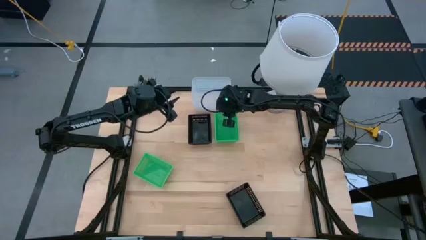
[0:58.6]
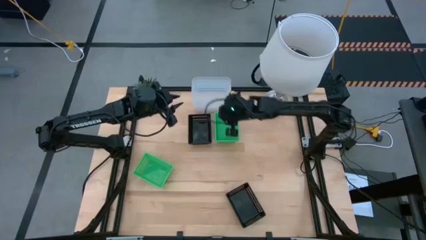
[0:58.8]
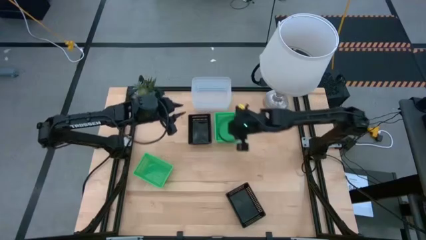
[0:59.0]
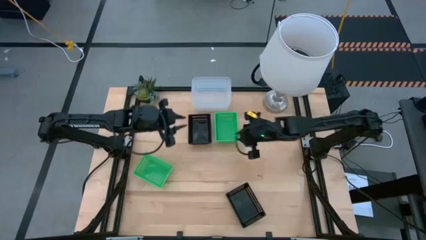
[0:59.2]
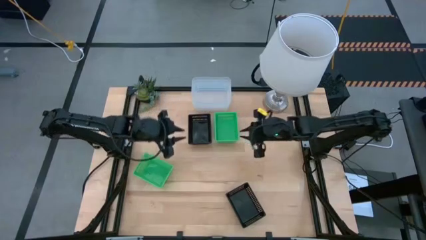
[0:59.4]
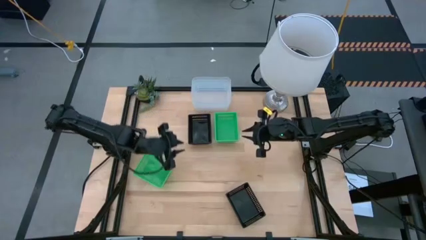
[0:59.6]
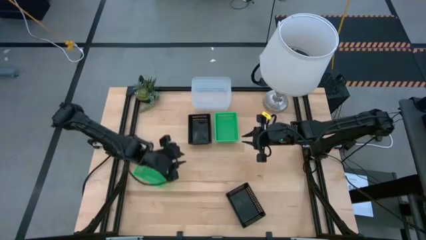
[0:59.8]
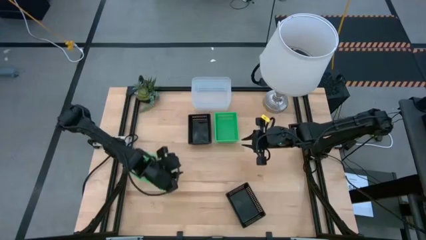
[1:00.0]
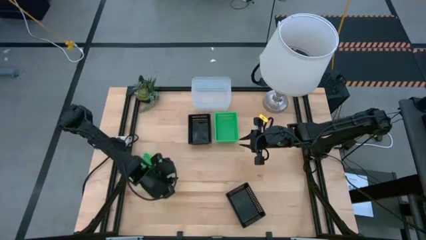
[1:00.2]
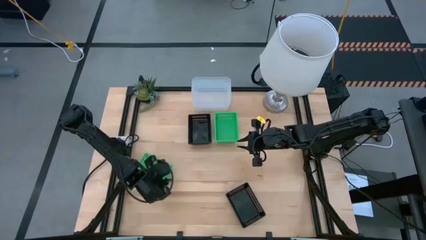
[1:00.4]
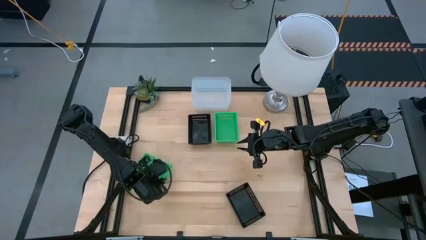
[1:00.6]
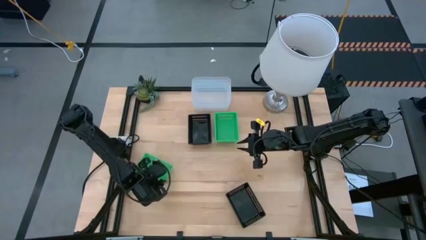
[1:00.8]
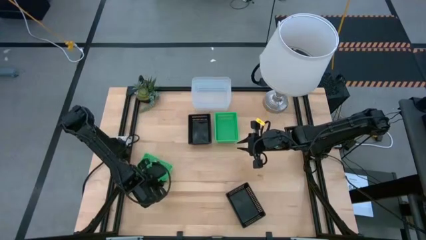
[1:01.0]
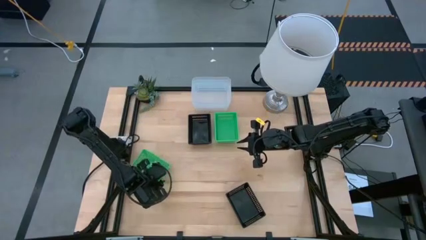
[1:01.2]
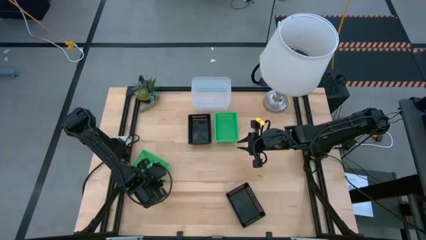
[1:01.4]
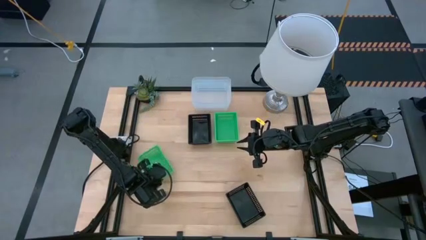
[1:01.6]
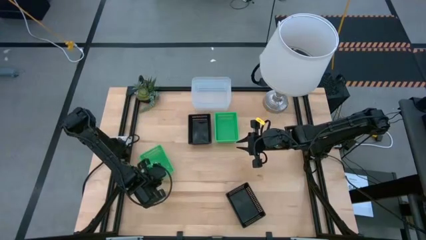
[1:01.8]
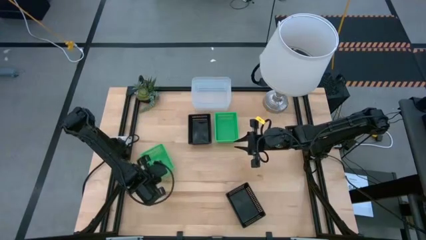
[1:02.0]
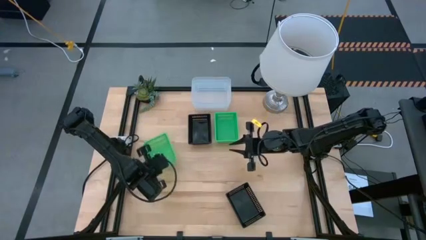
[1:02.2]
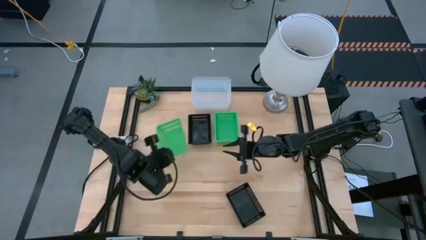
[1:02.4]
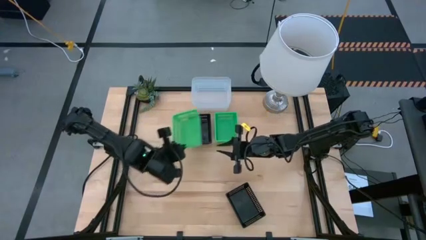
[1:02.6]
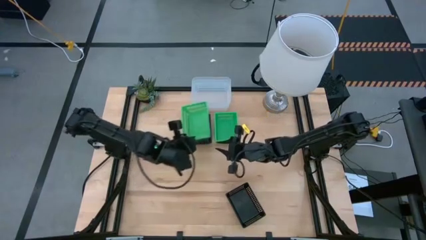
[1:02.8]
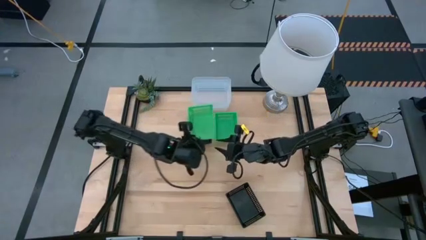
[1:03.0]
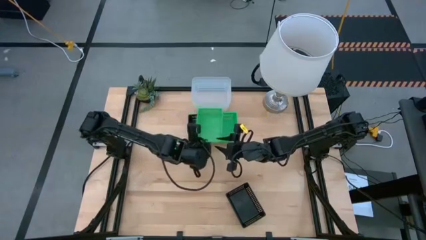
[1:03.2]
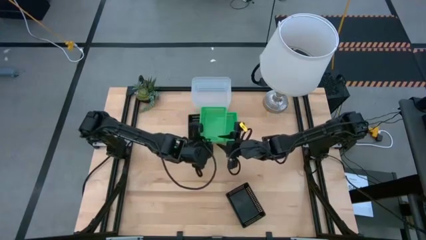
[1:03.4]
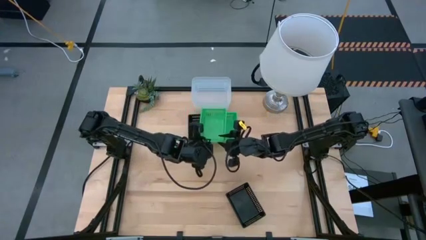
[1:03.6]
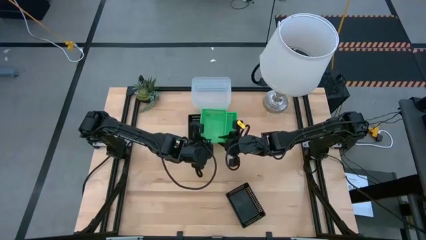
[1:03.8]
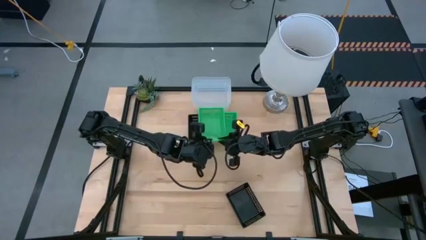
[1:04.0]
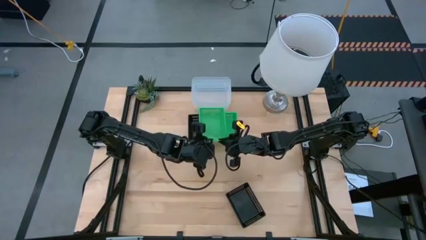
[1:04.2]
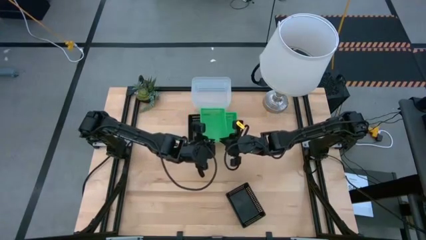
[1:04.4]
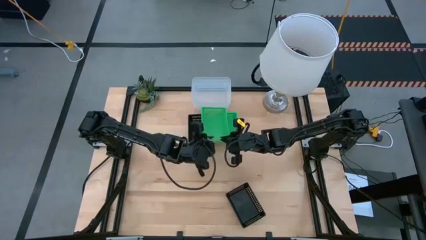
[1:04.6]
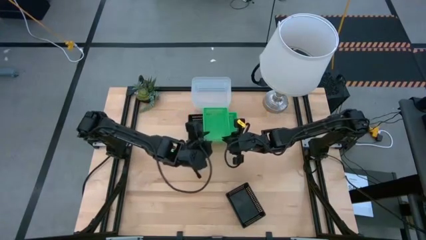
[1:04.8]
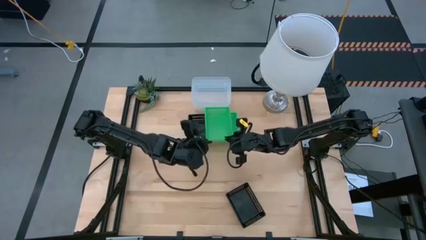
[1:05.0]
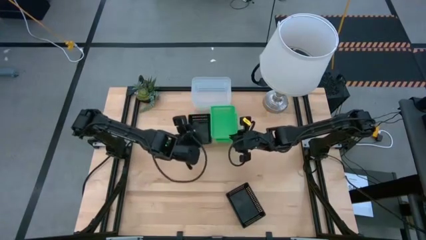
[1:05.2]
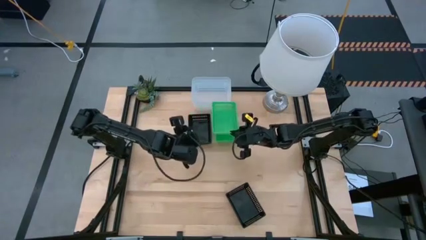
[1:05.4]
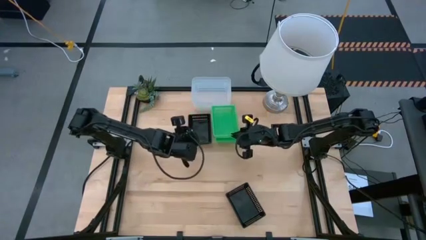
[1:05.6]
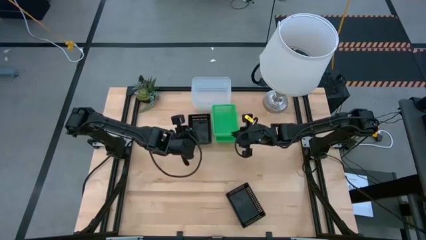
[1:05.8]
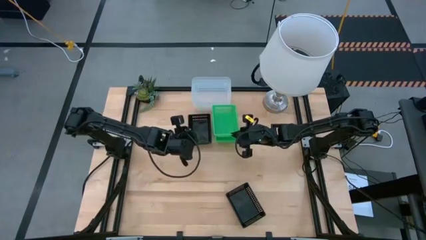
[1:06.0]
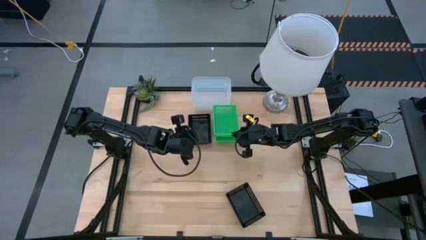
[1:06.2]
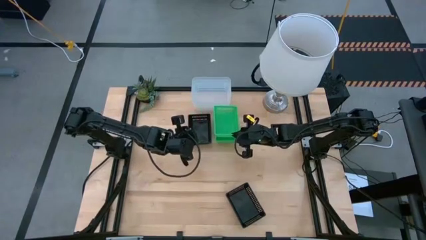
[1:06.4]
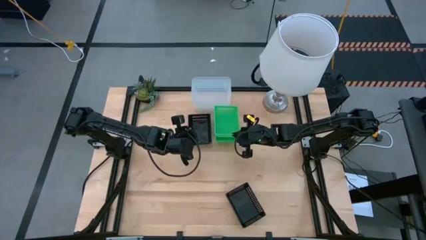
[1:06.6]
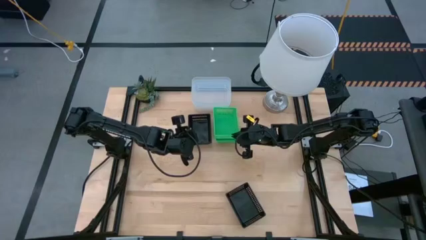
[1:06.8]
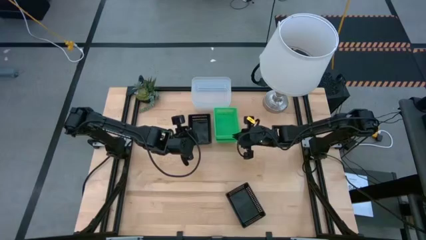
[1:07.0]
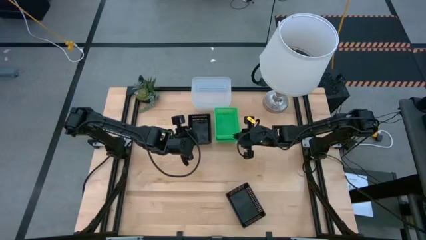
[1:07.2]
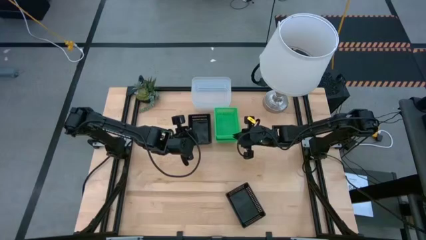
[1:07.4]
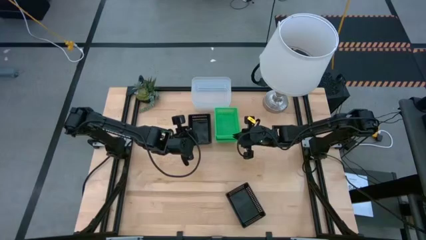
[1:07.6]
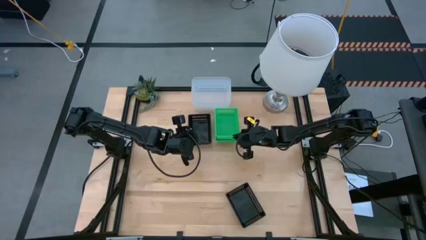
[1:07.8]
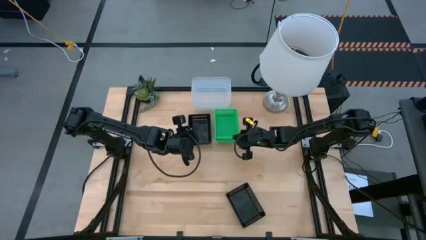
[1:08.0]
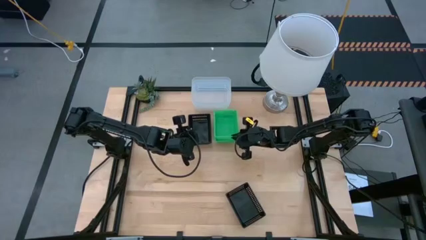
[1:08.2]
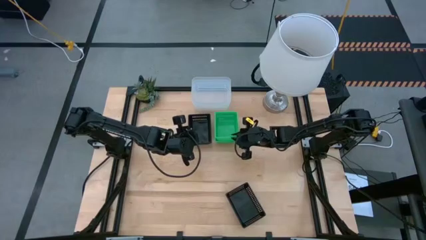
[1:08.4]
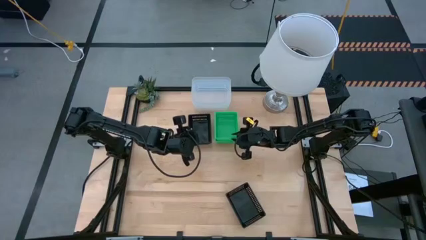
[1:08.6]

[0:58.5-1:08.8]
Stack the bottom green bin on the top stacked green bin

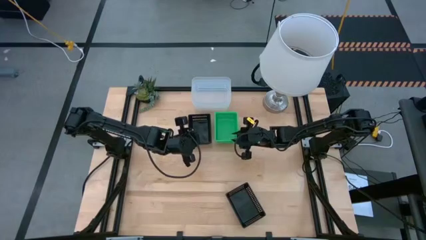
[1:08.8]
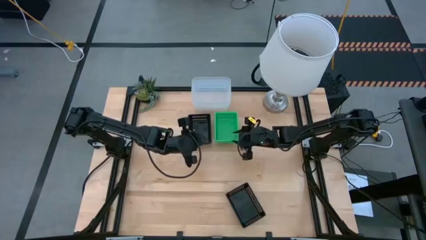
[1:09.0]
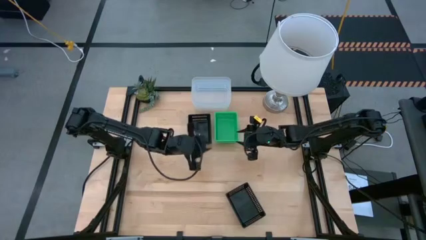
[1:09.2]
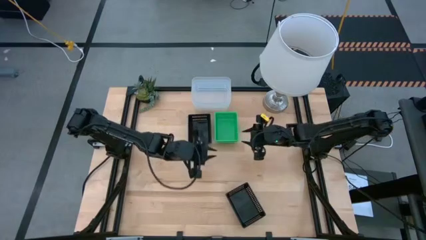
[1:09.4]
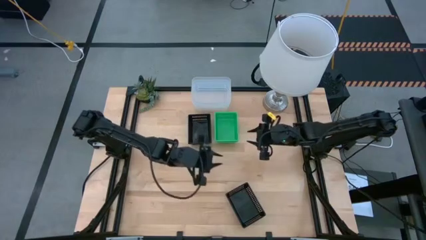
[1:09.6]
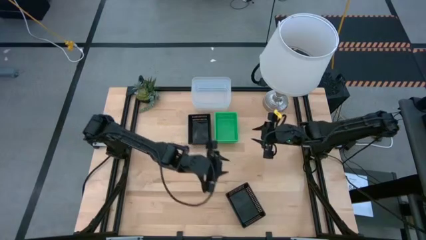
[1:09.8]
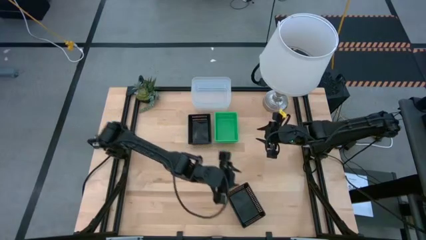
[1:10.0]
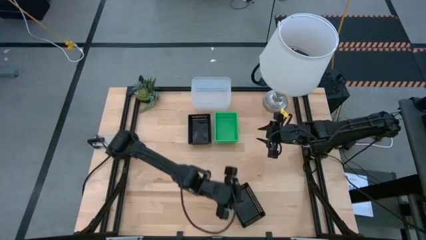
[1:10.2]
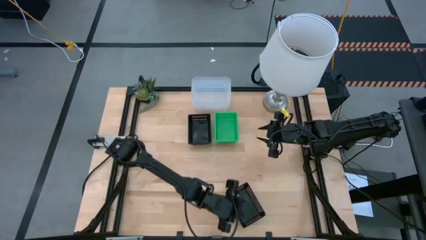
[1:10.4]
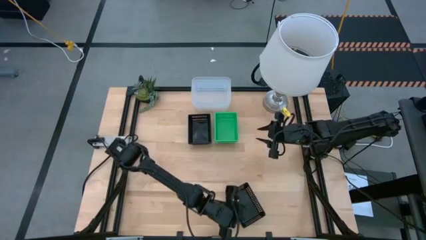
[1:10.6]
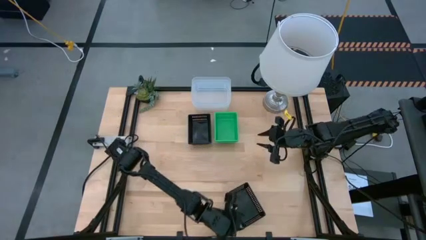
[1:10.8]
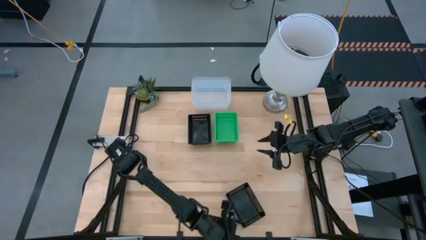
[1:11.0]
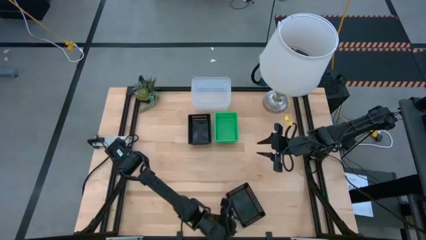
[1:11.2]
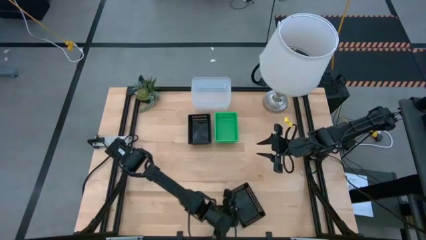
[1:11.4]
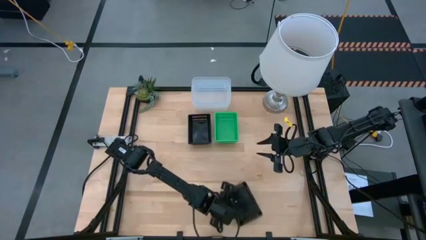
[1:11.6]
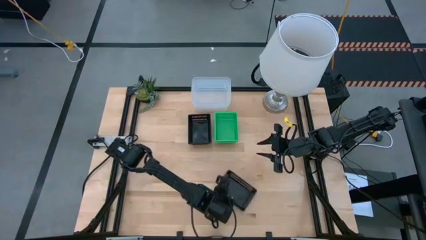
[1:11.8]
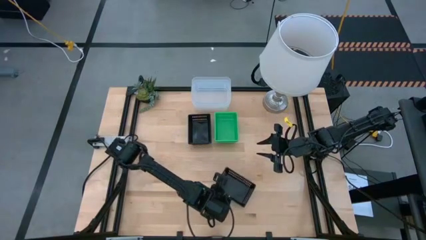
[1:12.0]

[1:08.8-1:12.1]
Stack the bottom black bin on the top stacked black bin
